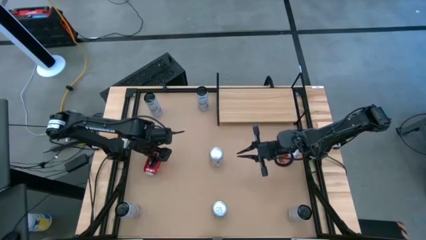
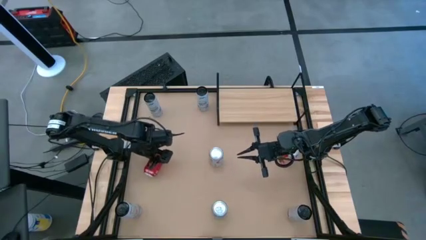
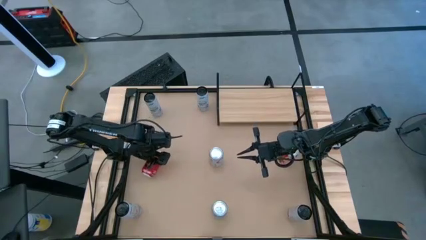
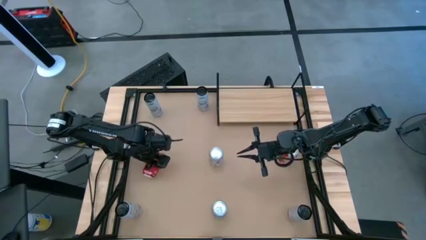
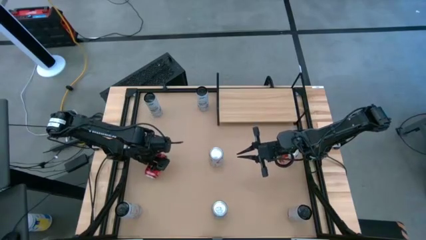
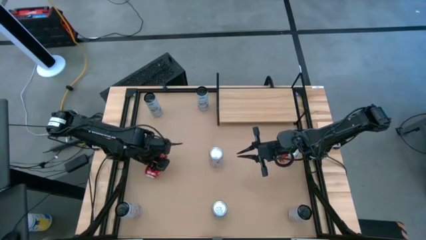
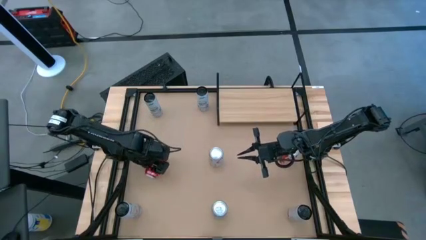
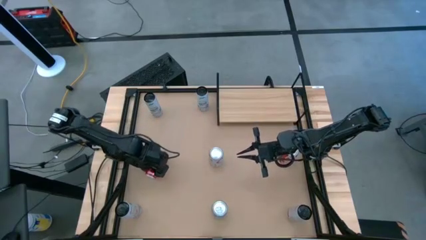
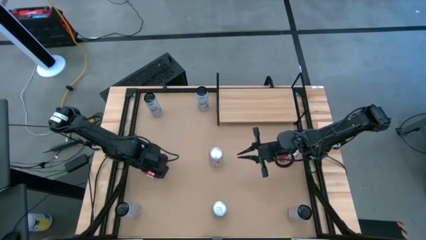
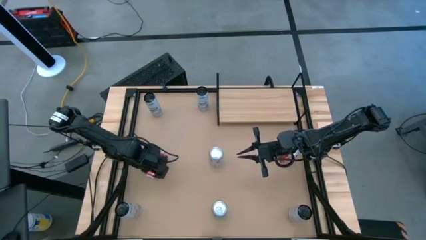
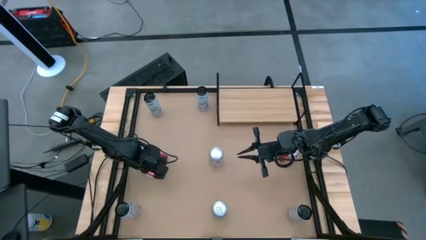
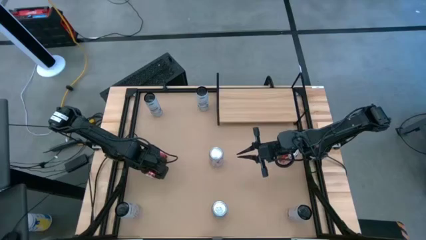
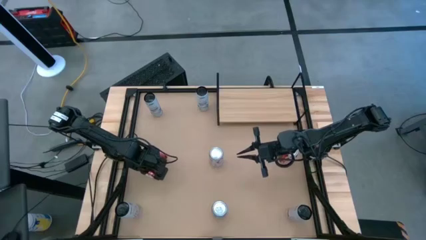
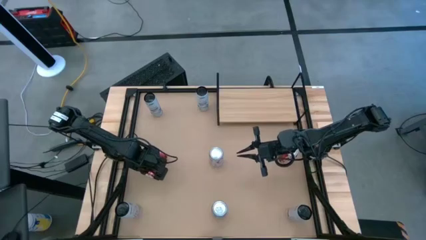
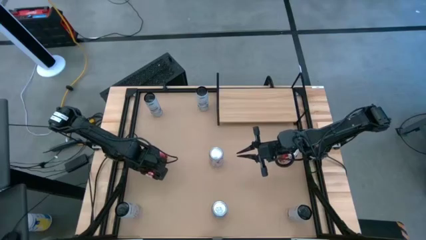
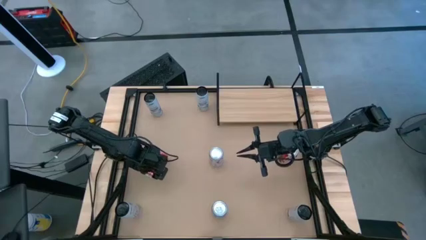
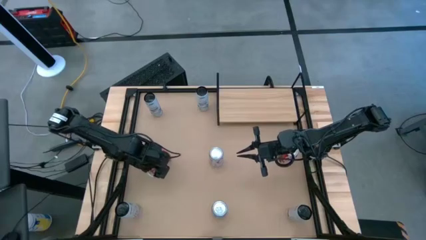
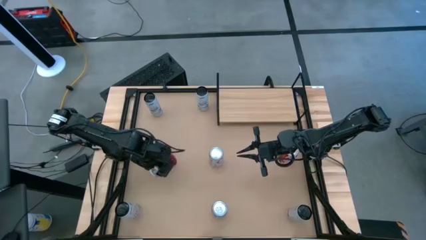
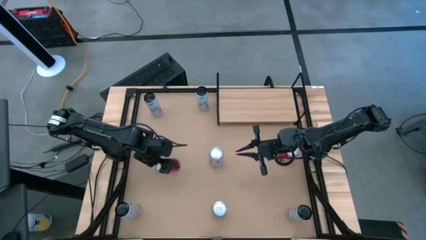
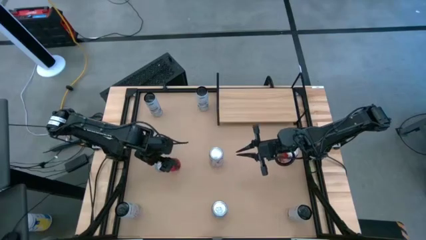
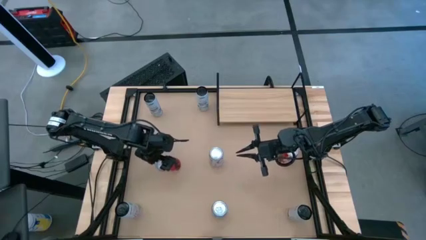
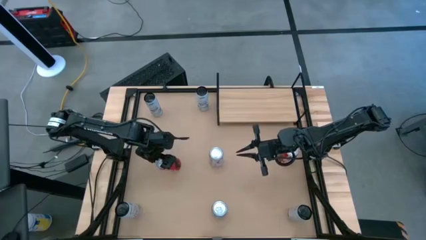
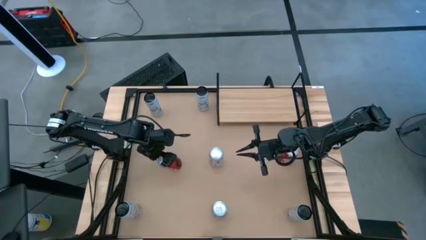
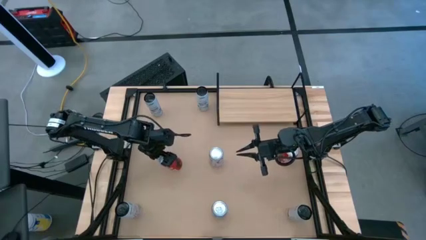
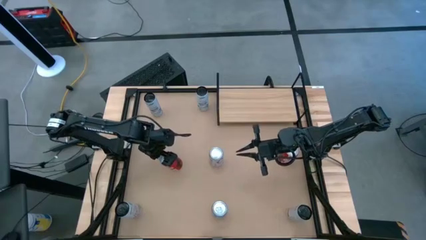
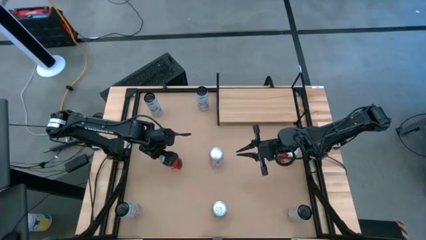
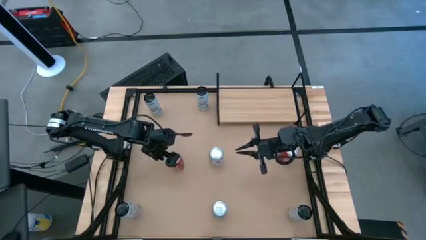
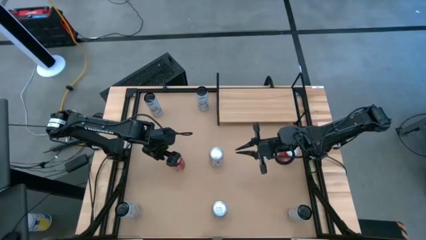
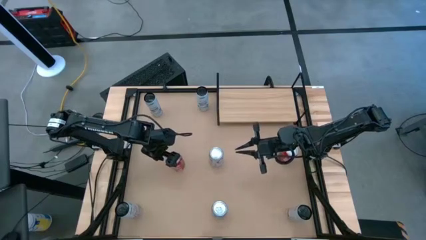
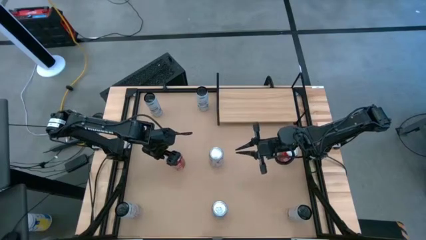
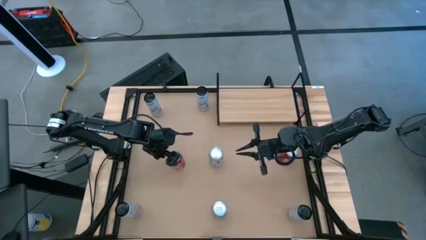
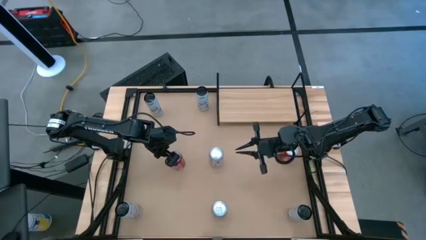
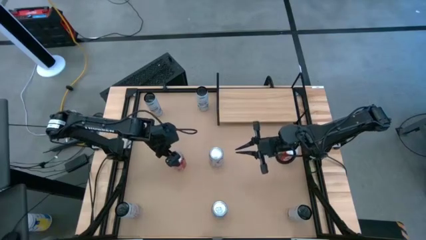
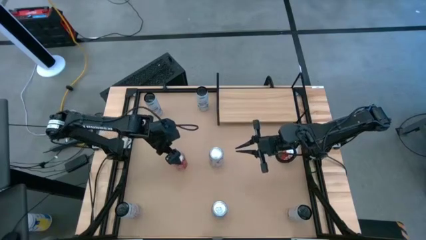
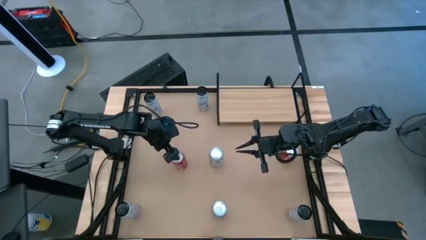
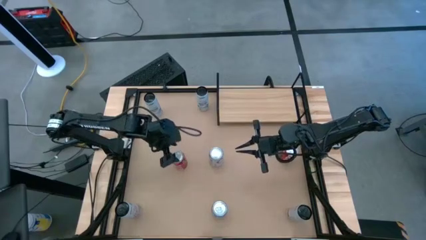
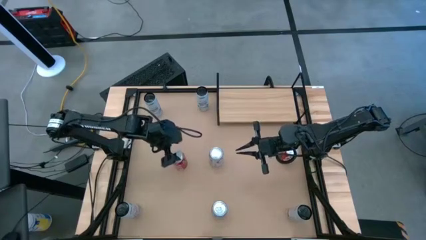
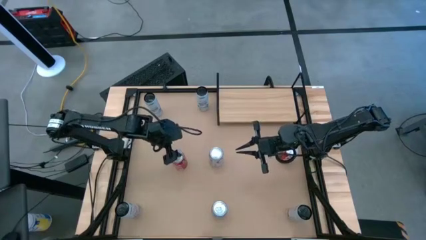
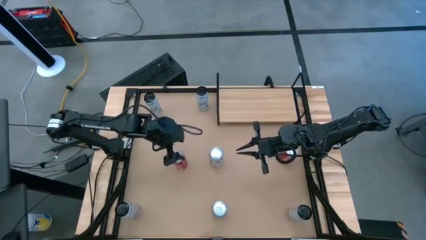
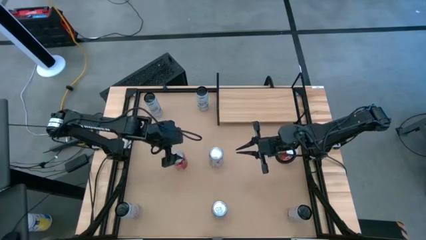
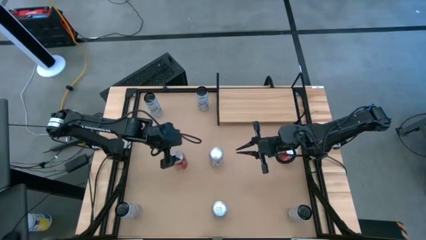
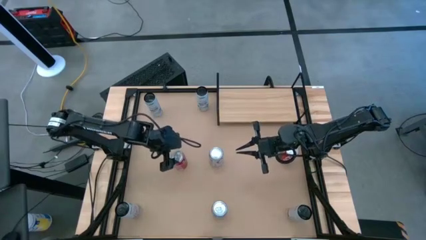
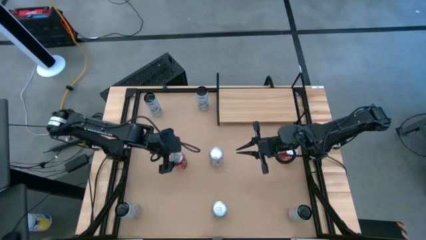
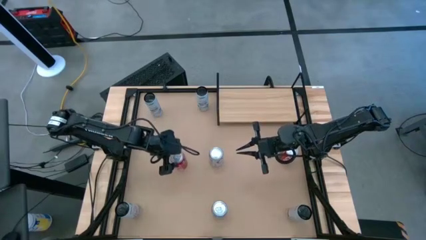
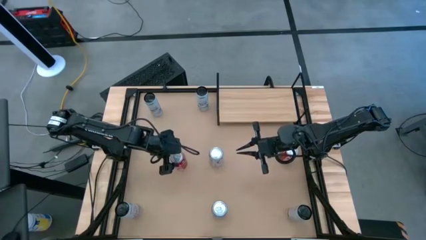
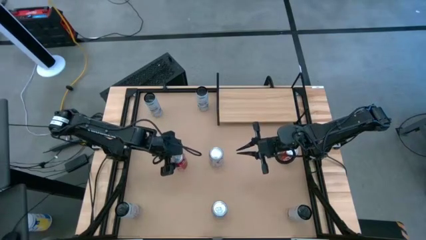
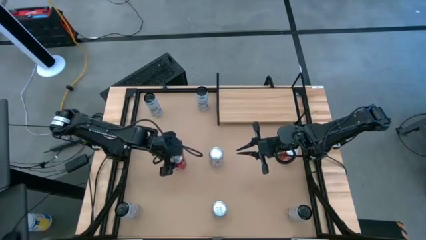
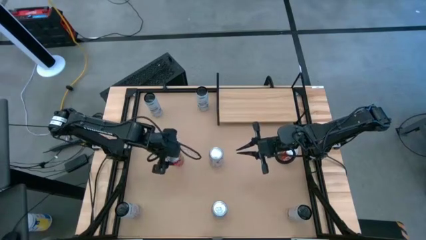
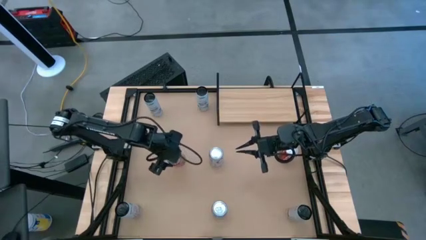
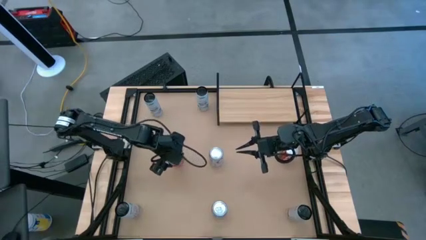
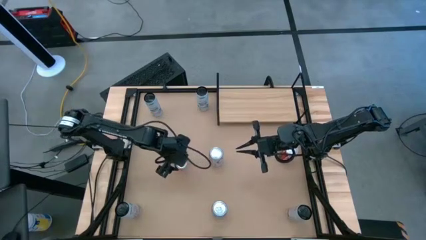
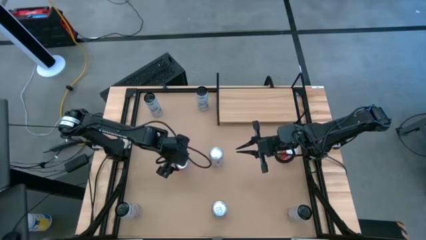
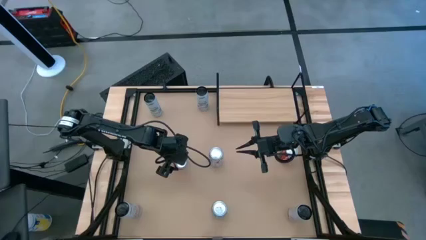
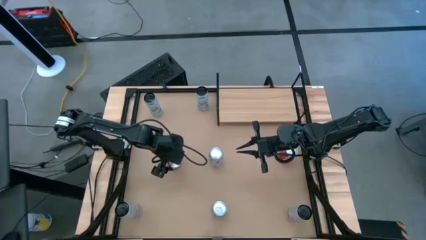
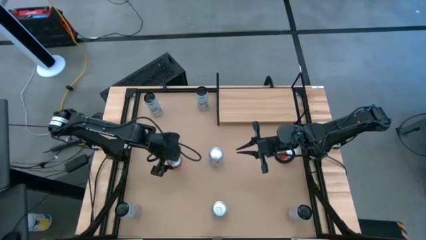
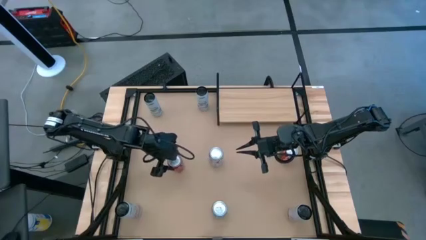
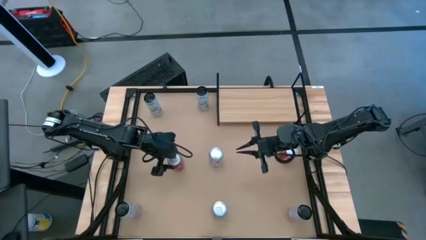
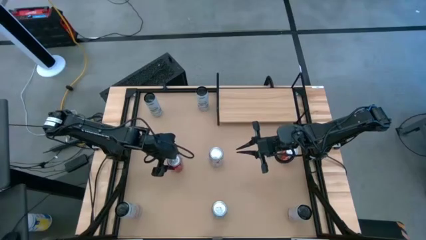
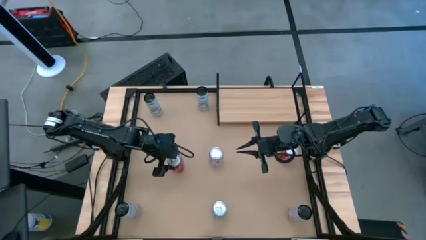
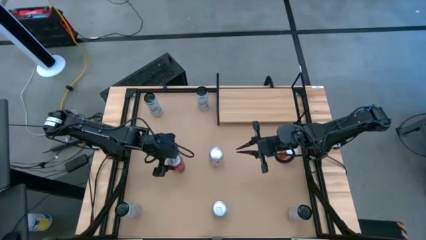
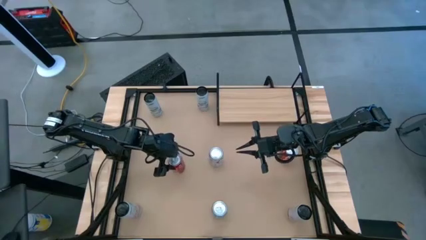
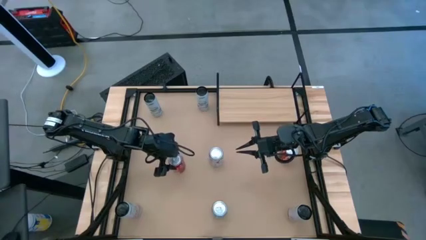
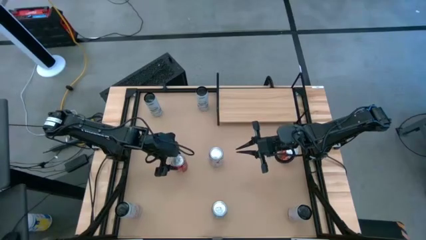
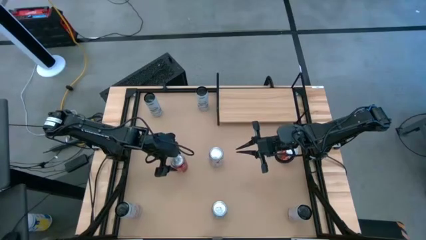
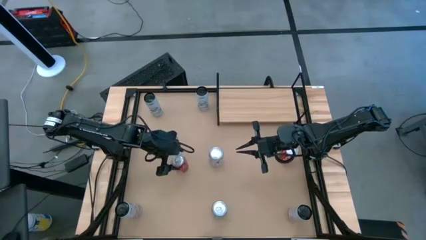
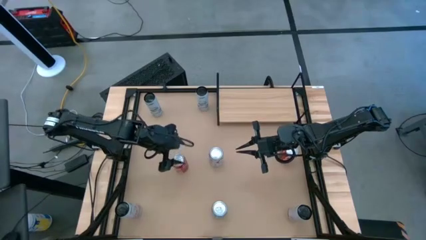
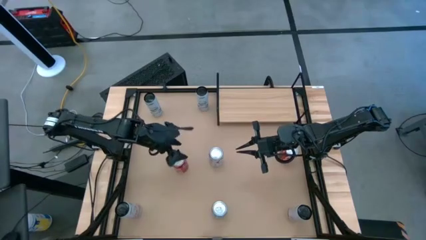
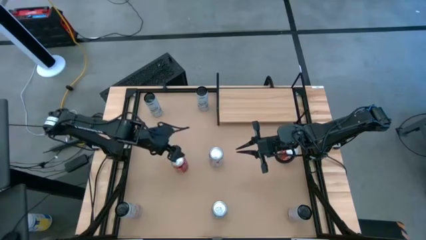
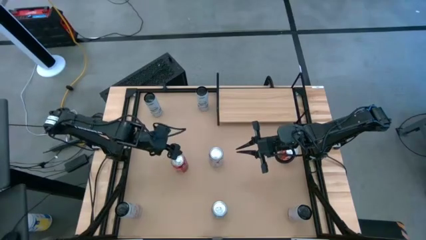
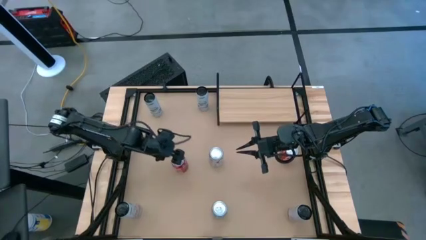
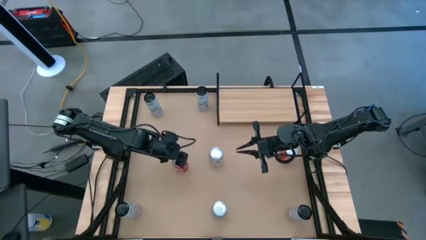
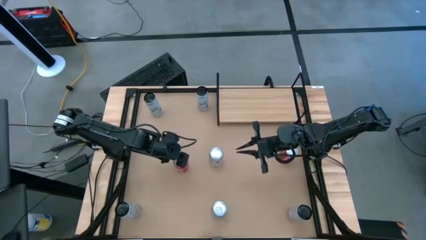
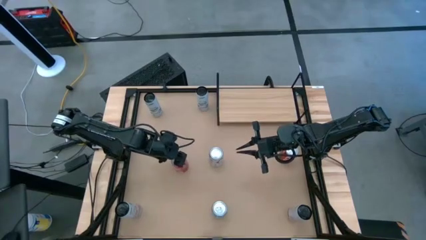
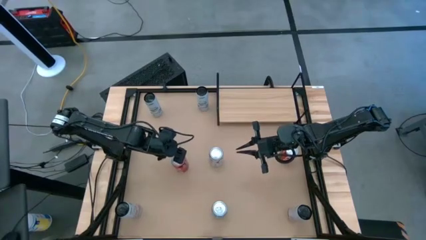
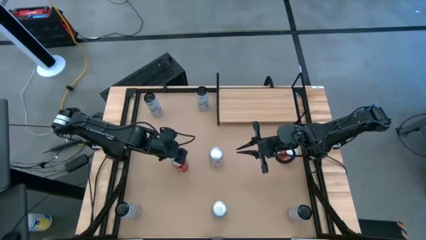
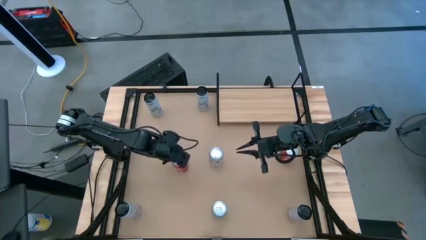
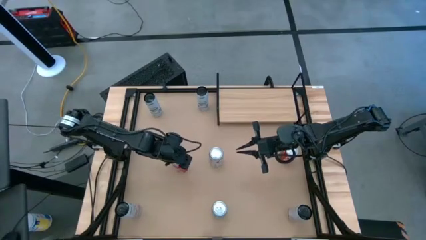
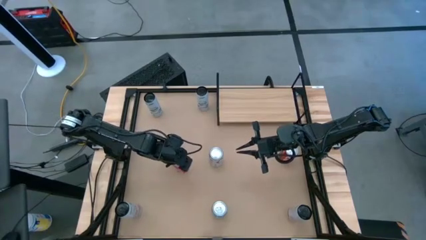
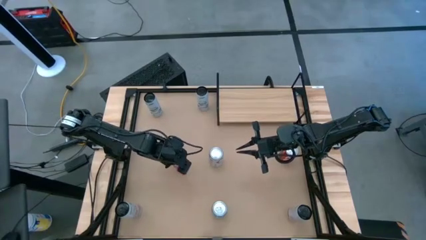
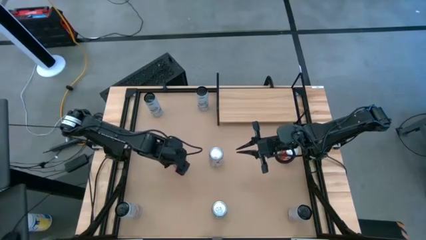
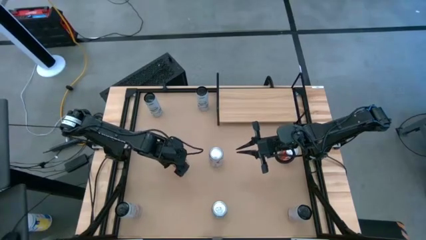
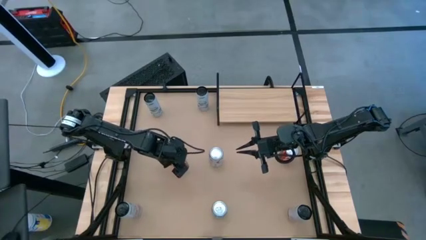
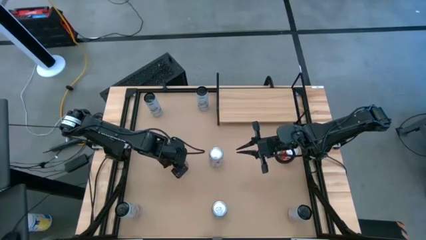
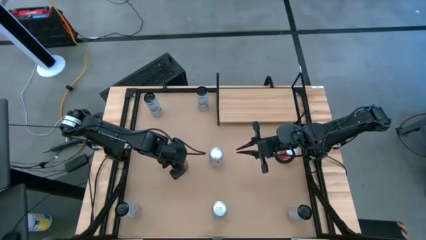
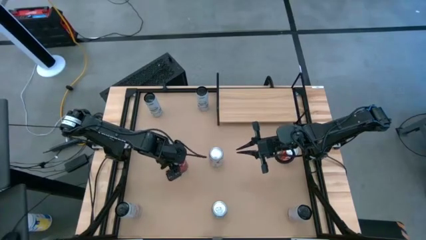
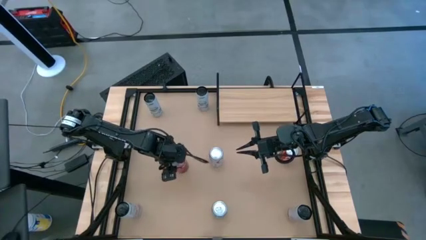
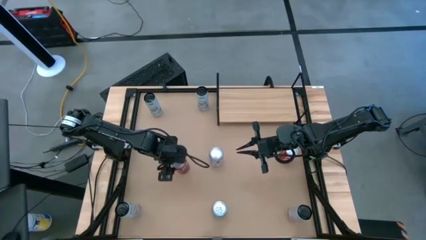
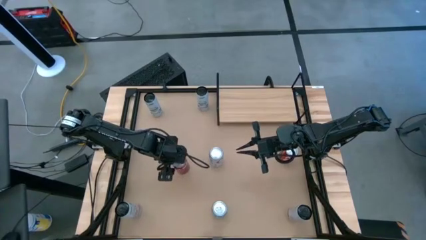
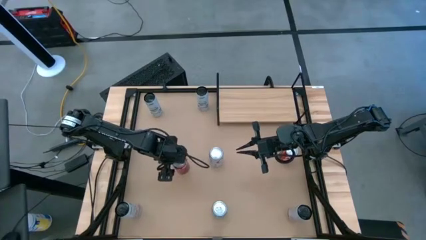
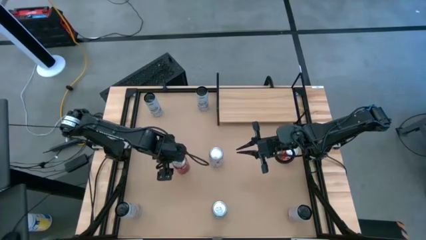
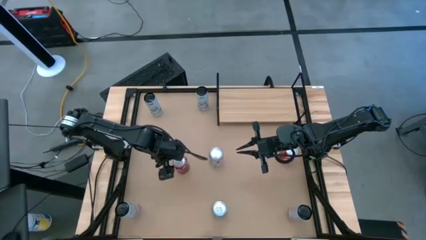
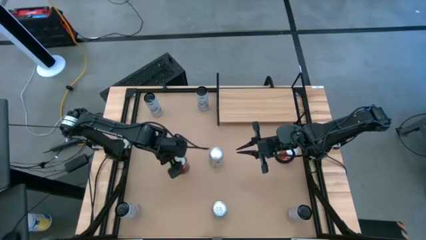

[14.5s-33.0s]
Task: Place canned beverage on shelf
Put the left red soda can on the shelf
